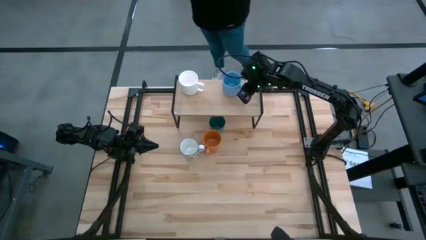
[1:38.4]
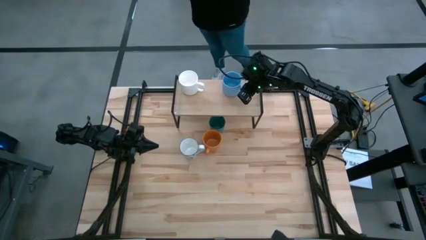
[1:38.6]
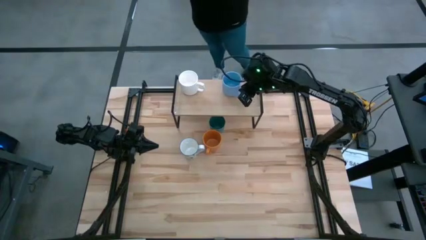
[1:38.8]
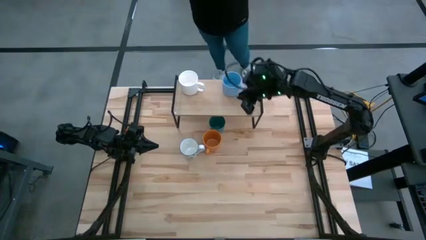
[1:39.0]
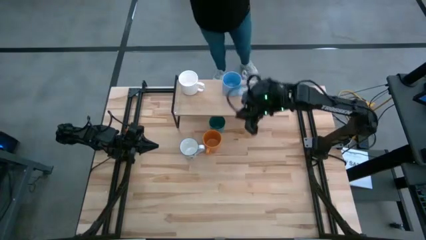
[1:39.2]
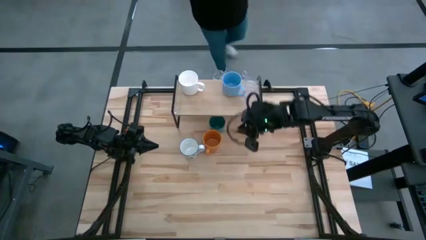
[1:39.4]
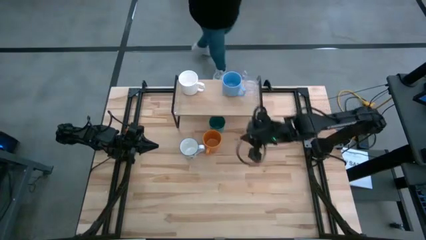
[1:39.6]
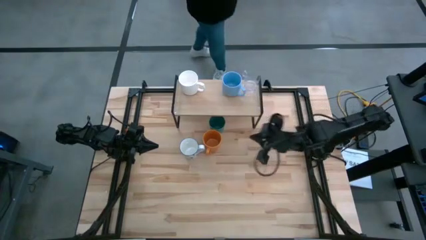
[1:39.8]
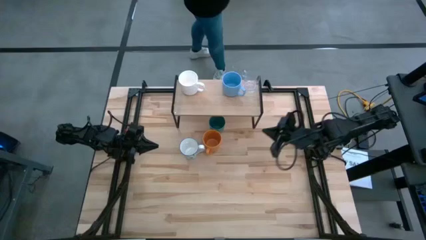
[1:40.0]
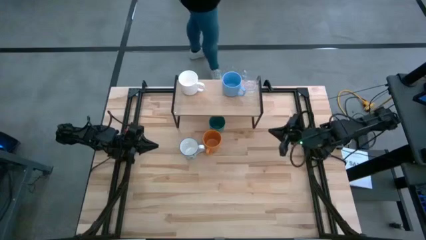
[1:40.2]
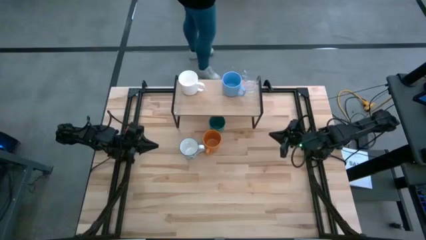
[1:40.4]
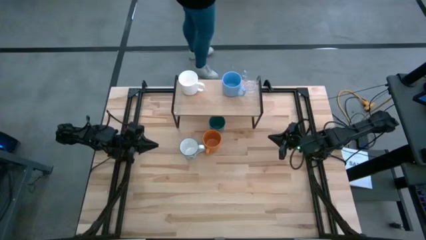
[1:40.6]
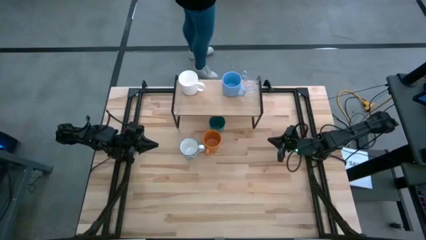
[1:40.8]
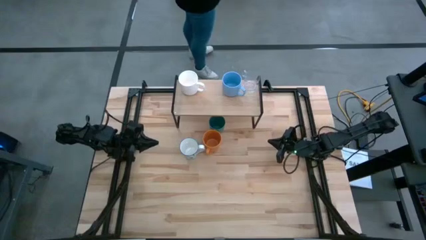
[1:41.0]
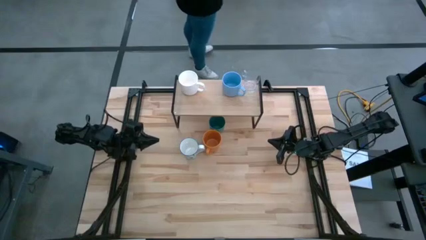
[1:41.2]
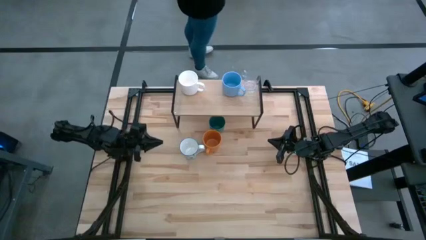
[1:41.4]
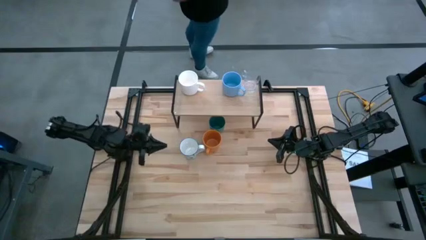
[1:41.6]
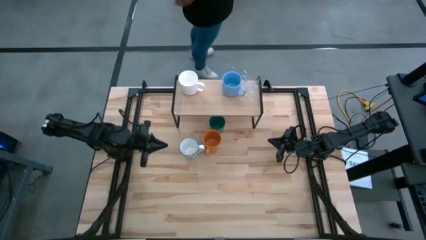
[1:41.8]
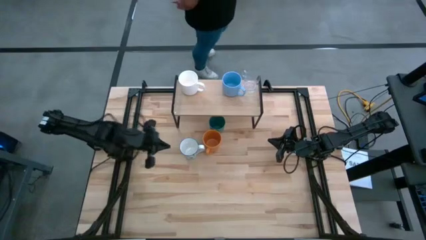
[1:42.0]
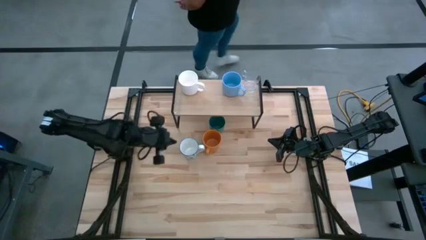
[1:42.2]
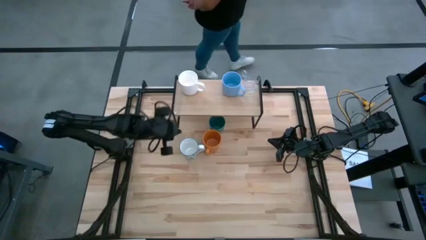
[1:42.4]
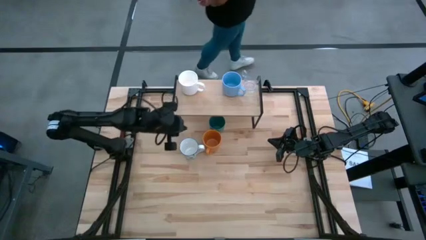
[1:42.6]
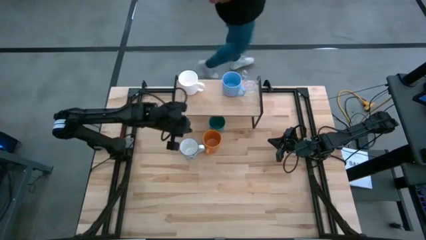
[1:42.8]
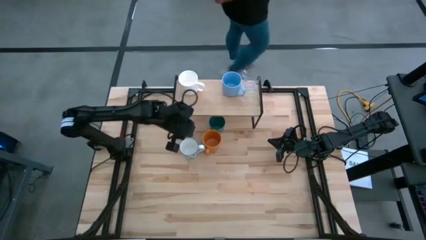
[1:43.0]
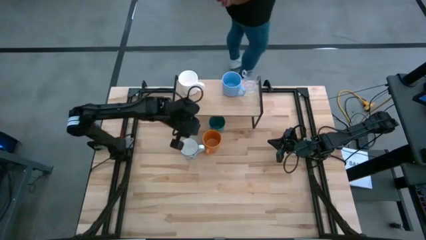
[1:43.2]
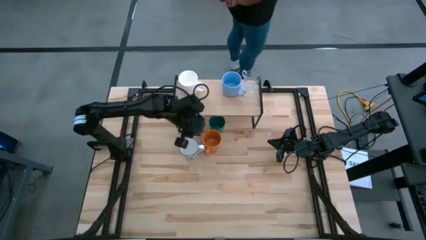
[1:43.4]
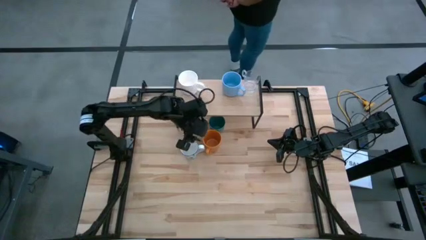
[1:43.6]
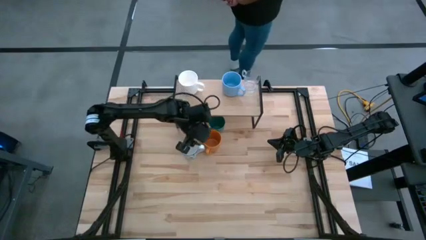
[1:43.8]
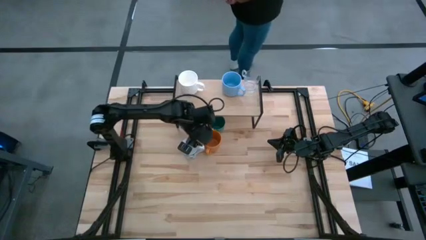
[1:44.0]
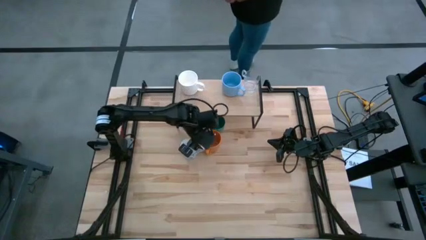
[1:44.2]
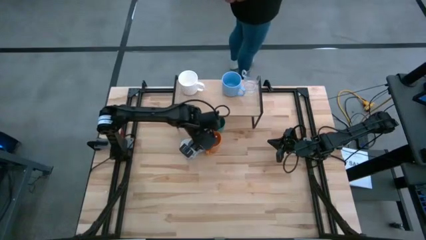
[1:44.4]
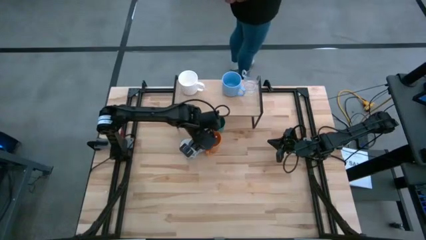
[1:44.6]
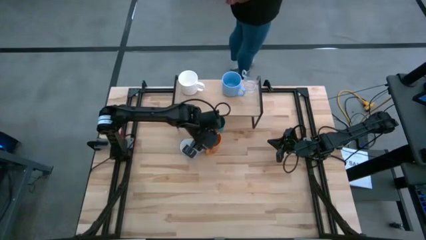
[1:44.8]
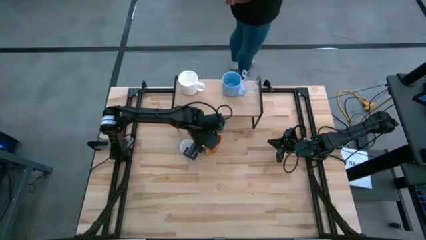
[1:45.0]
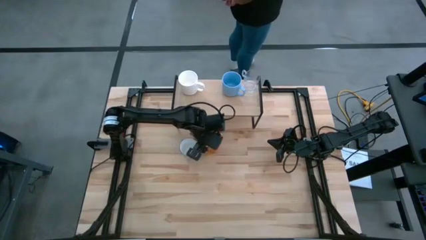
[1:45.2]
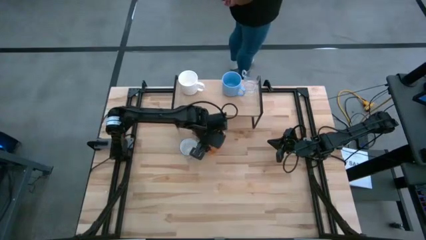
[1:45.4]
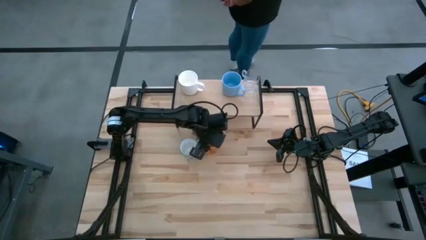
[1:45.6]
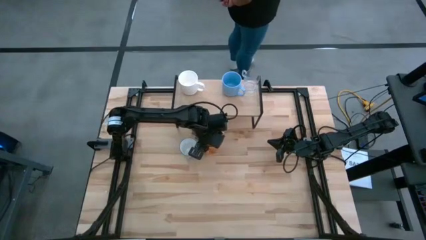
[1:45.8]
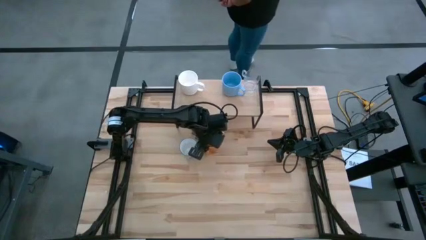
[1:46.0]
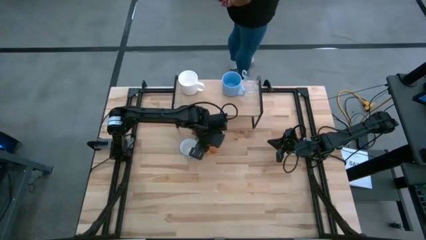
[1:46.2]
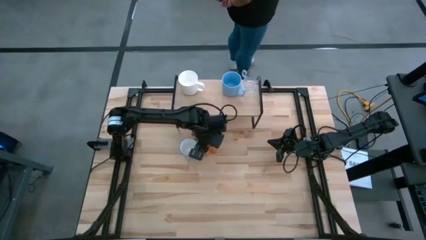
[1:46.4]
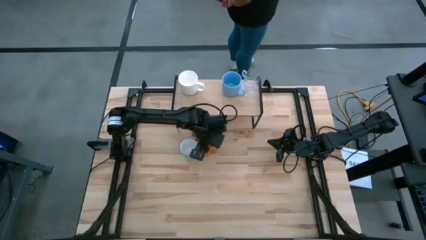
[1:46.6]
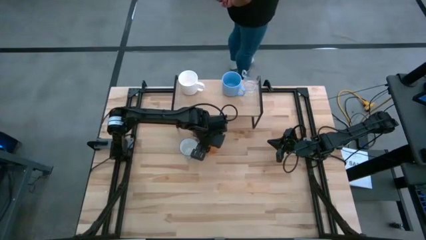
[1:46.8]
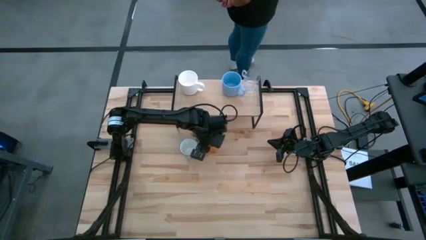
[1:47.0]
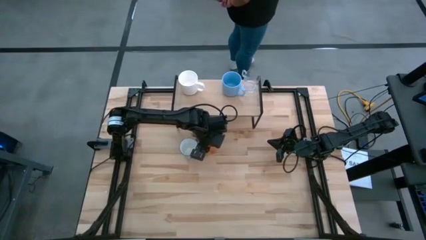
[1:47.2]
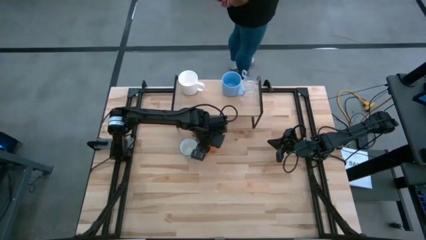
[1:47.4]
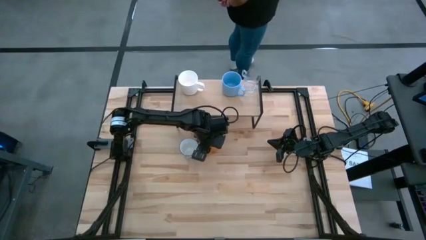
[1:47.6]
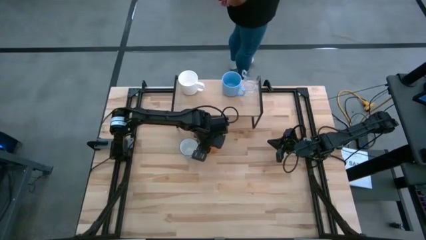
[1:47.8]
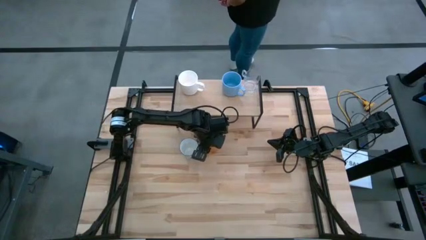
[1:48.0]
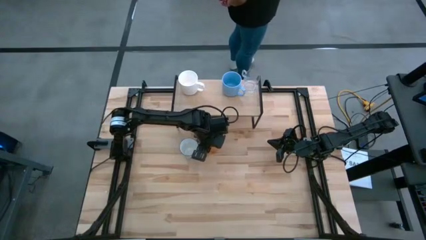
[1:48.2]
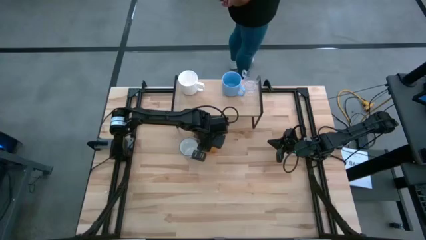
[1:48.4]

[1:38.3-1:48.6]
Task: Stack small to large cups/mugs on shelf
Put the orange mug on the shelf

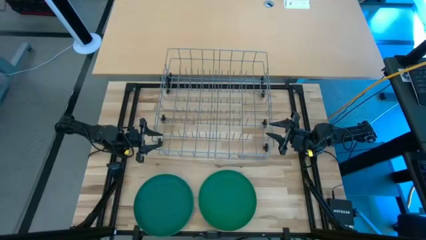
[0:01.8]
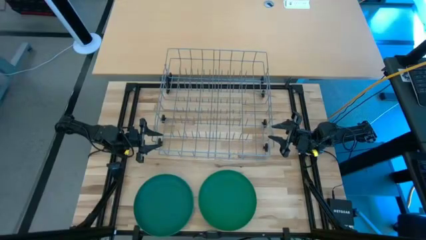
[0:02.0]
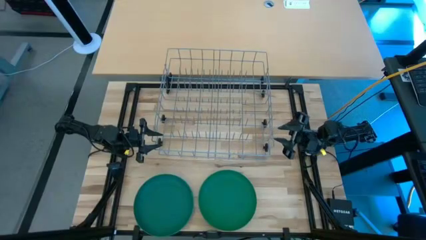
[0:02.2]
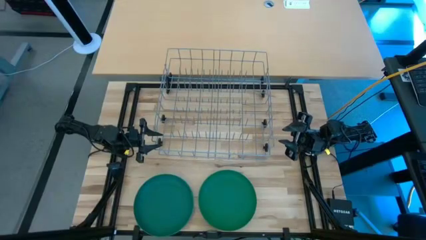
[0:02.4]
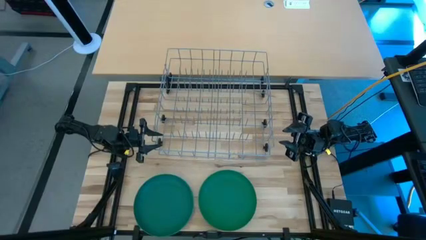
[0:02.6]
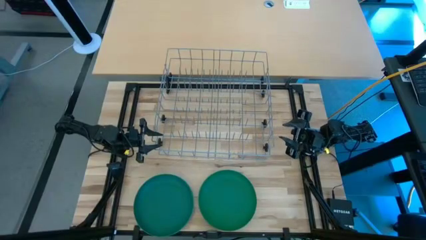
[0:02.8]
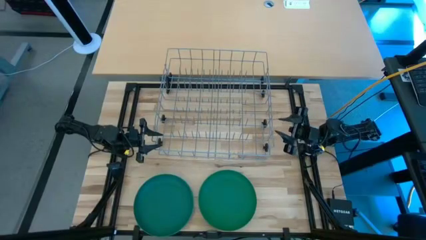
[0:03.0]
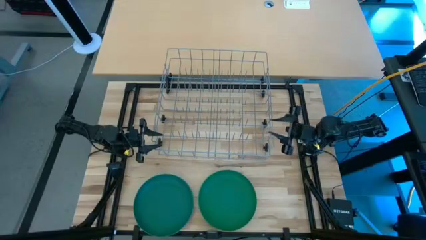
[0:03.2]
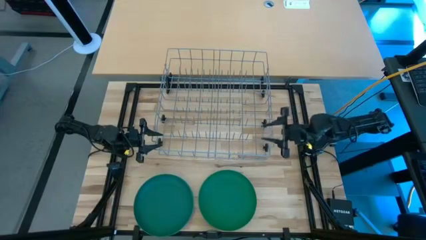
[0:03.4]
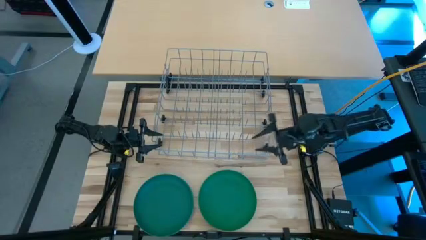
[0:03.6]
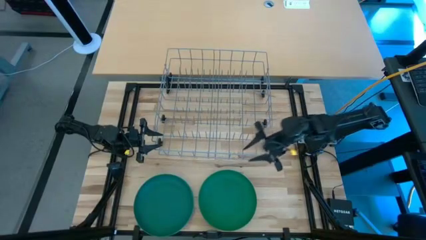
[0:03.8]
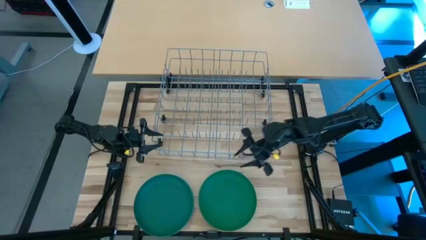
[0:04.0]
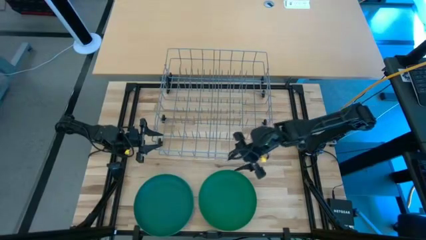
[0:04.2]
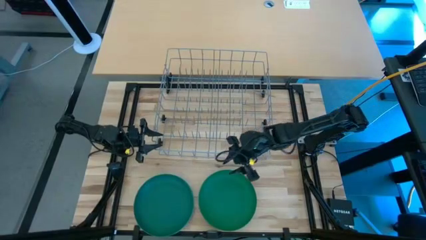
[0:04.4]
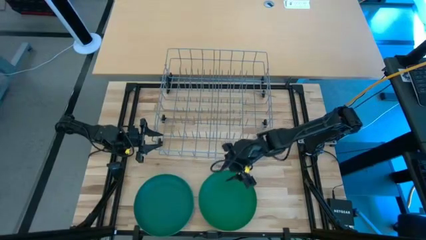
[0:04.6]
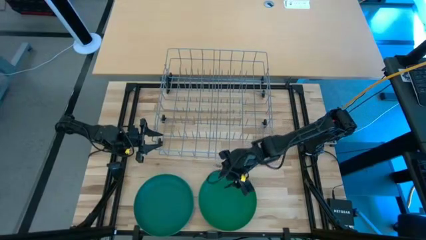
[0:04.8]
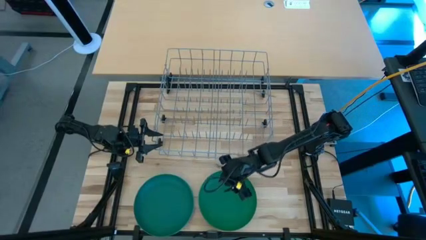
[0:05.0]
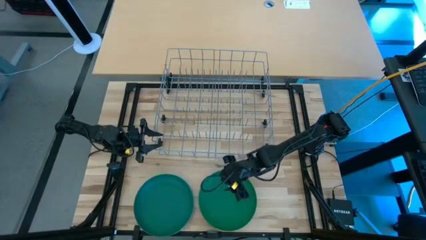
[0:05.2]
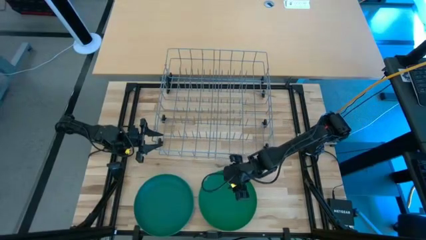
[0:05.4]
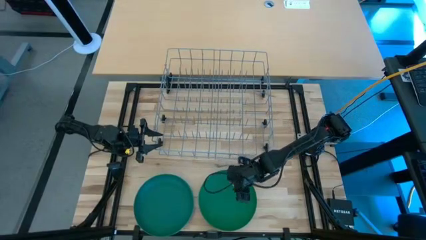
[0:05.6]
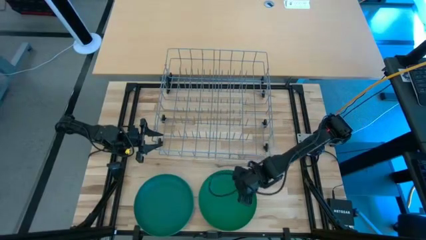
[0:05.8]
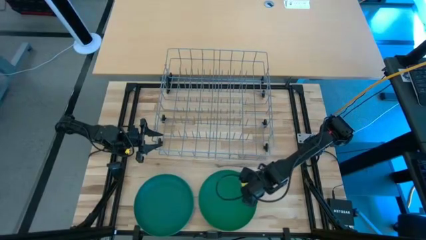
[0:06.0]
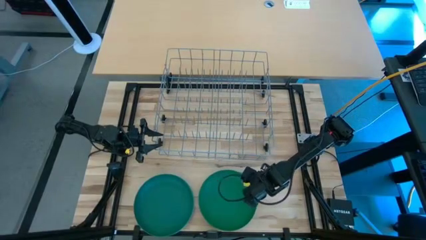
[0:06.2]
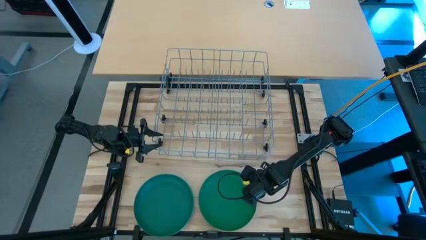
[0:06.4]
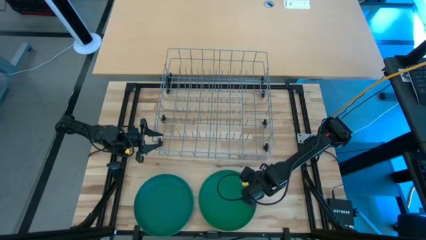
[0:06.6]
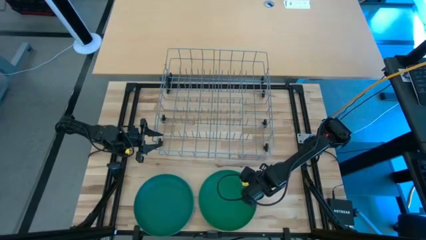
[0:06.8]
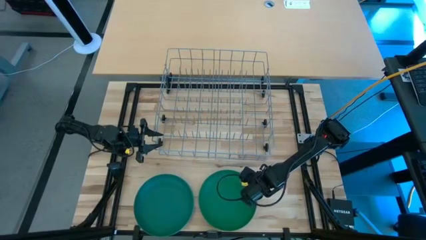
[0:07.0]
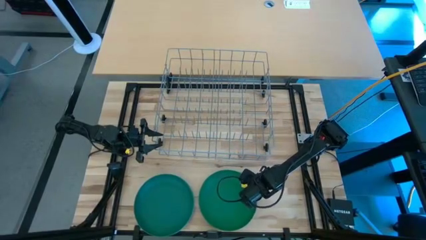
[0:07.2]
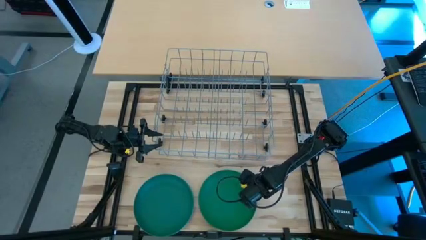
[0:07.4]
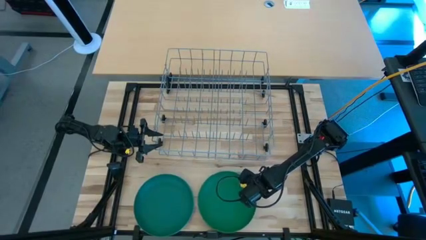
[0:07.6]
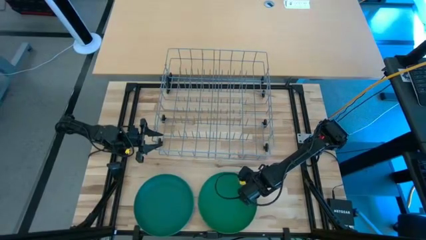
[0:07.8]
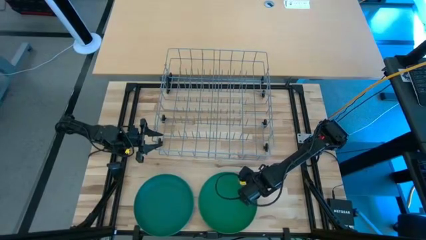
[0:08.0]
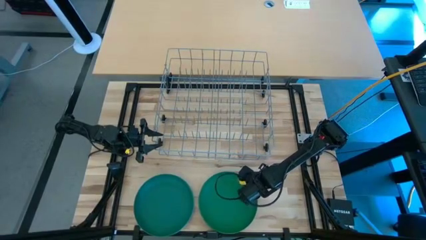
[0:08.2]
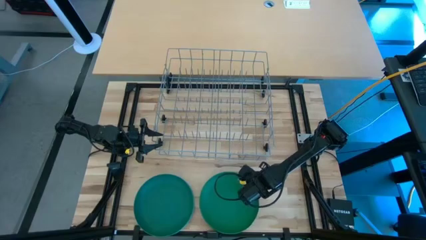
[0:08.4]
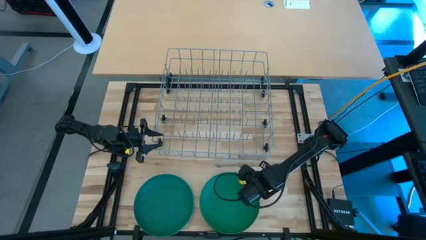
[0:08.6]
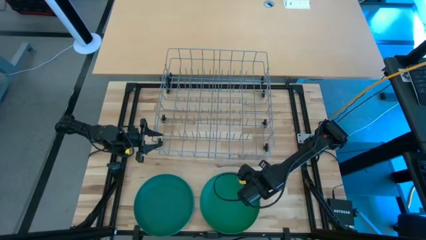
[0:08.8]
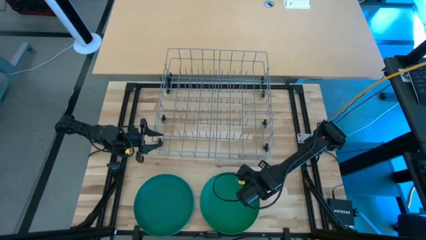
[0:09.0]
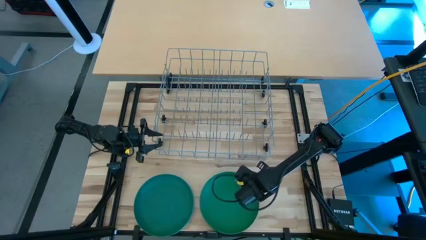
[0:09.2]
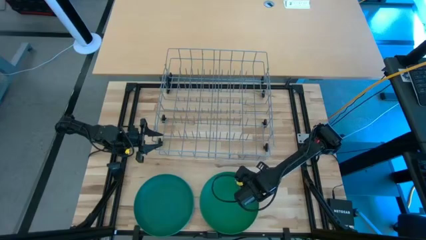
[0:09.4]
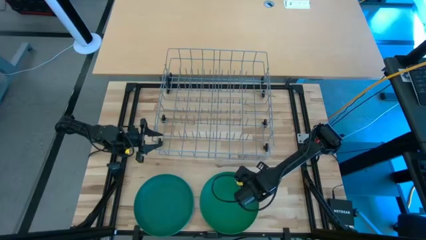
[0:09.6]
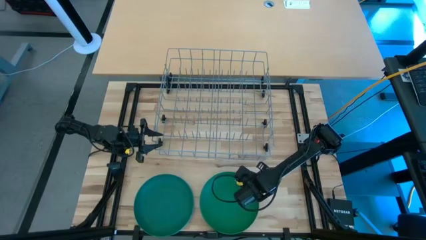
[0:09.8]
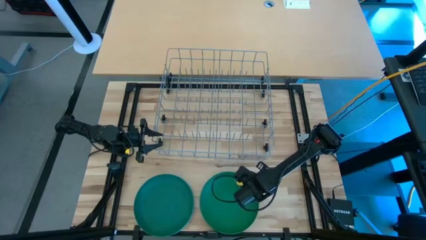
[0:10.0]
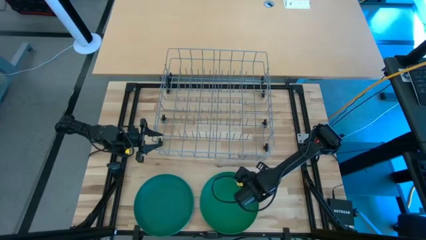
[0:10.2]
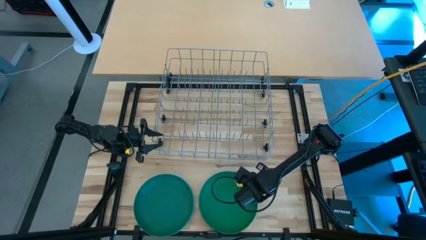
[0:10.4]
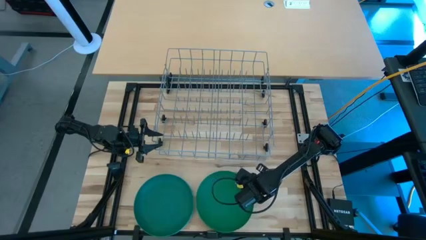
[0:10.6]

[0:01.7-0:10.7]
Task: Sort dishes
Put the right green plate in the dish rack
